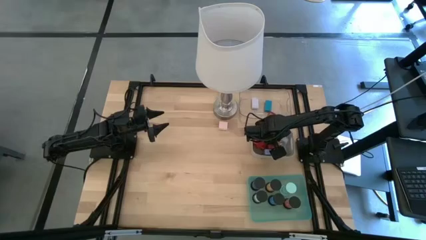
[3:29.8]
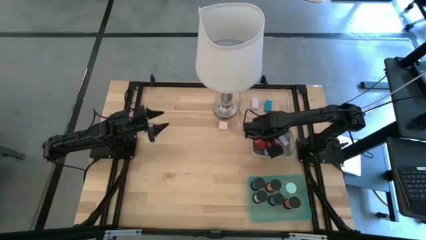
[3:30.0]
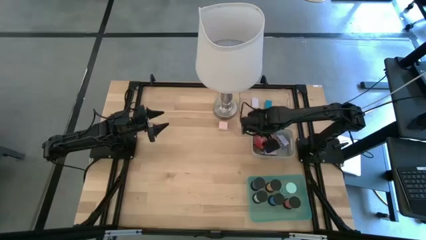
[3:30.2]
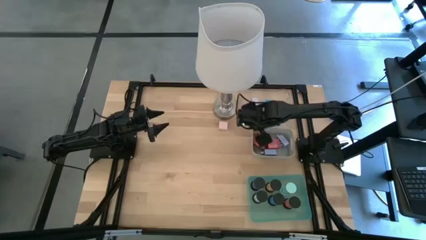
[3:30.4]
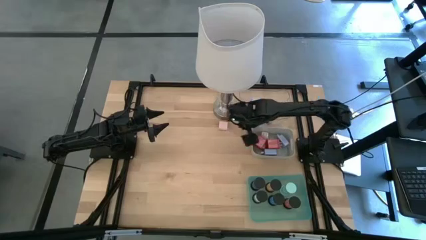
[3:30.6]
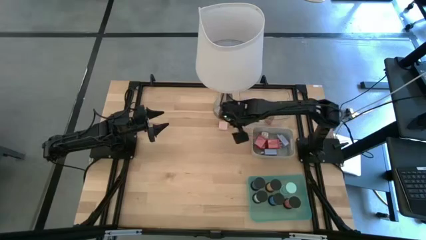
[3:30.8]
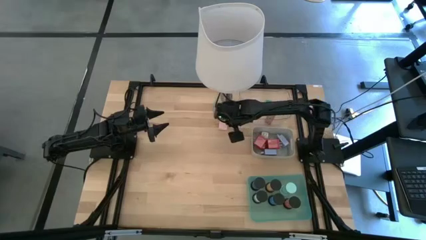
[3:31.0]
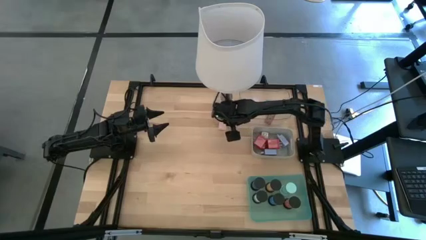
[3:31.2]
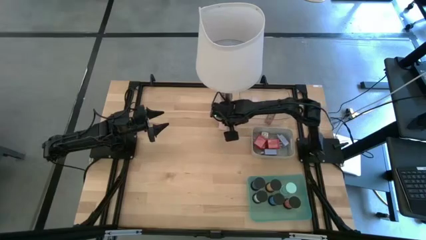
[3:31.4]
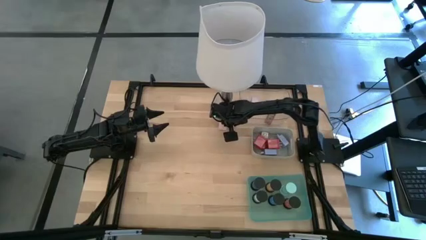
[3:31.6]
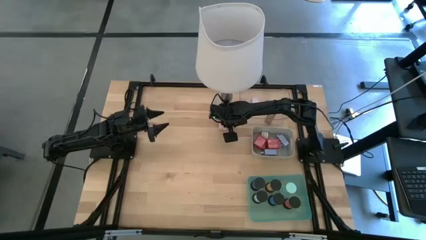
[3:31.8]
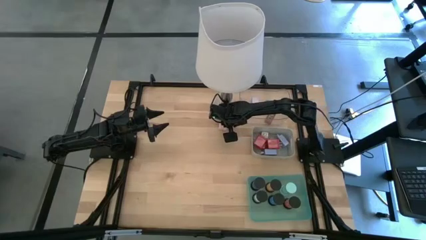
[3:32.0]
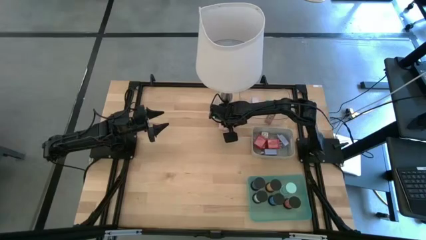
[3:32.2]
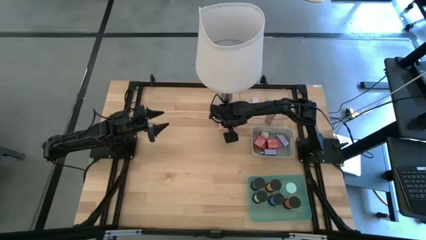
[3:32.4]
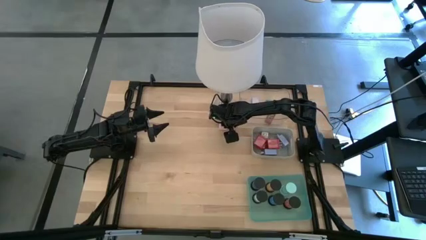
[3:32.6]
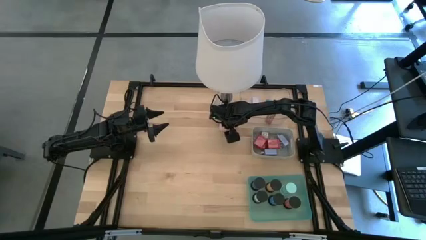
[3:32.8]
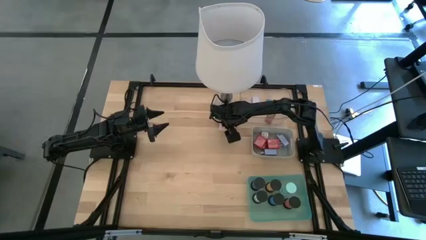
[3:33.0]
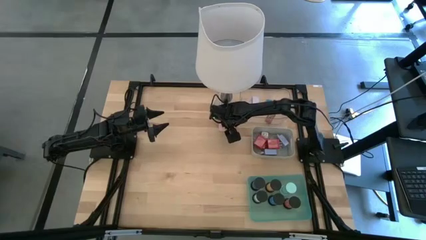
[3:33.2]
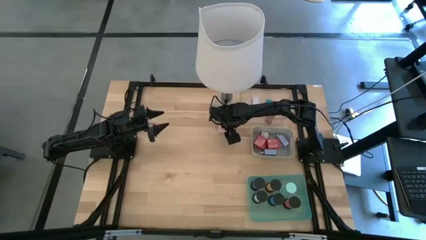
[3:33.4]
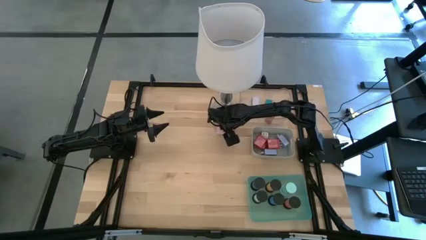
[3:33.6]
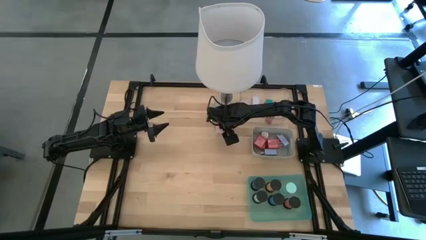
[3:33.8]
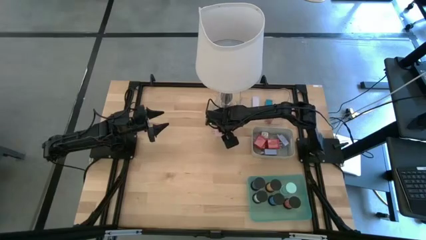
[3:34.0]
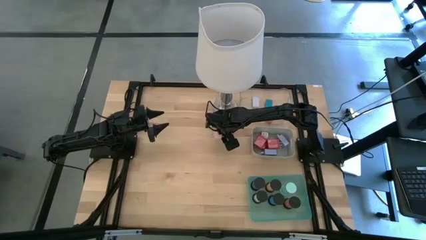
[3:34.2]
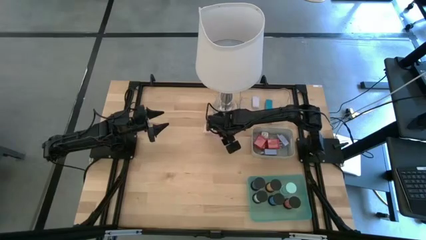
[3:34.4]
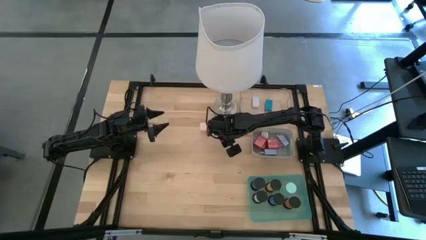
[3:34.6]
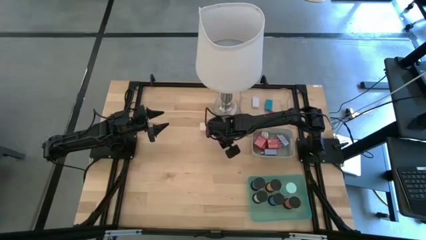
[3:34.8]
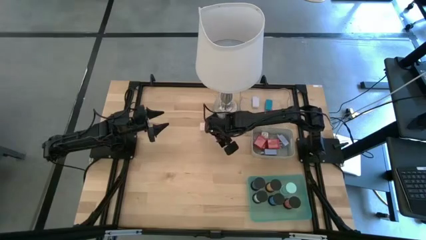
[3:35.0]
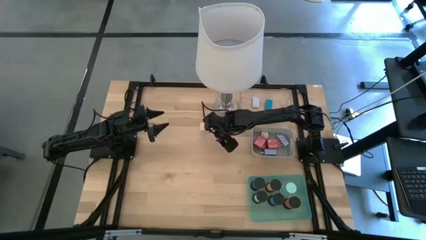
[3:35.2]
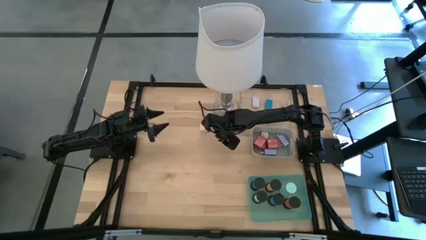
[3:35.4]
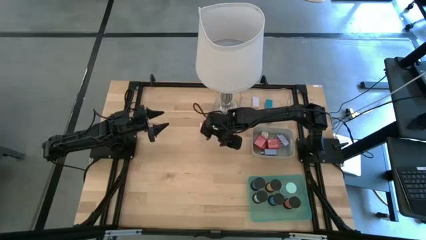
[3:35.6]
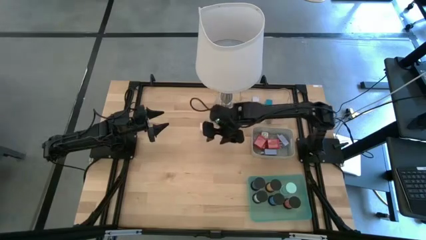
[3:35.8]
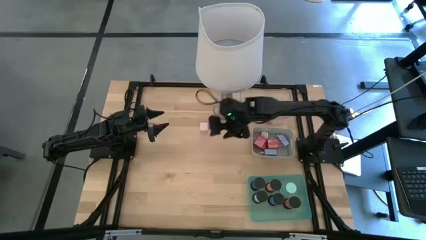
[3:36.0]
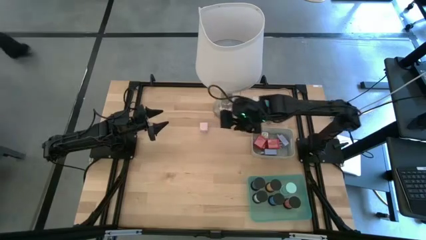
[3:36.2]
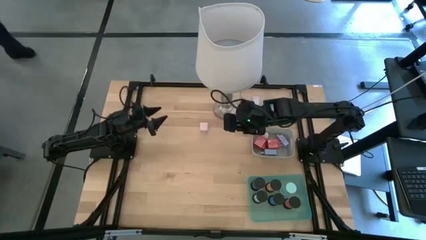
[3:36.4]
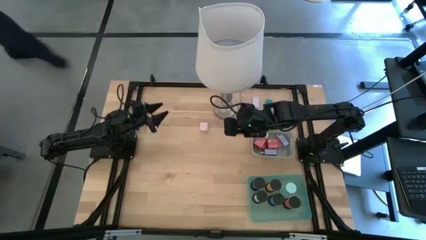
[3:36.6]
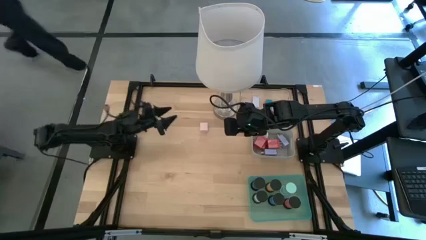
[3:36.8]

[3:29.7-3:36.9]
Task: Pick & Place Office items
Put the pink charger adapter into the gray bin

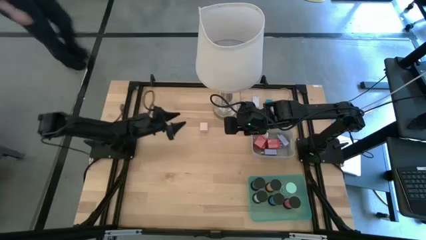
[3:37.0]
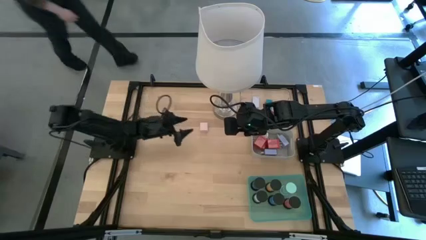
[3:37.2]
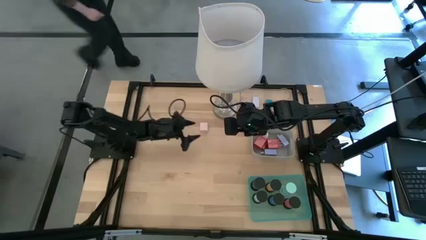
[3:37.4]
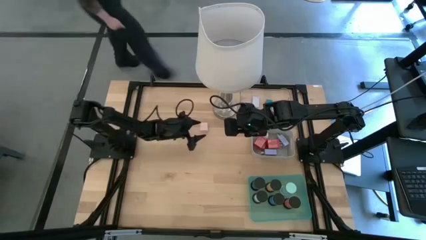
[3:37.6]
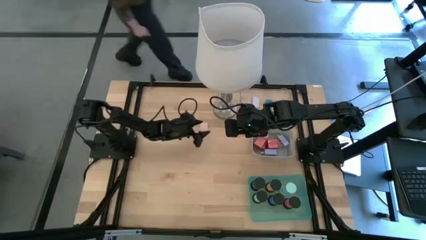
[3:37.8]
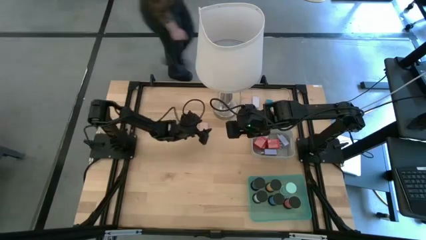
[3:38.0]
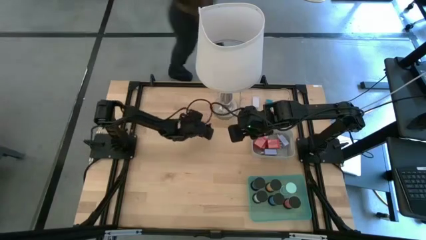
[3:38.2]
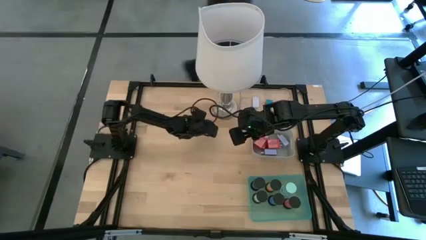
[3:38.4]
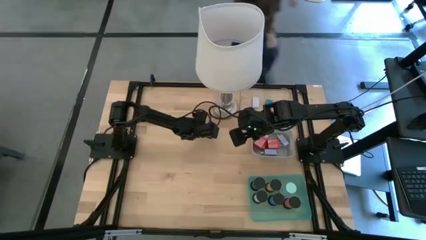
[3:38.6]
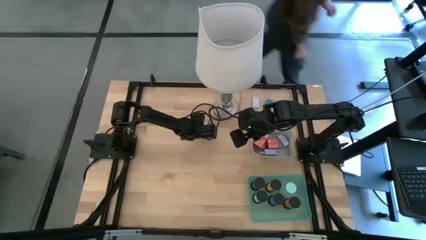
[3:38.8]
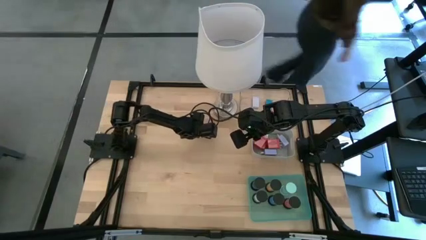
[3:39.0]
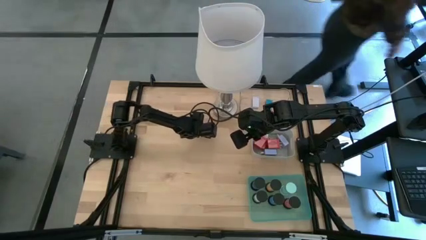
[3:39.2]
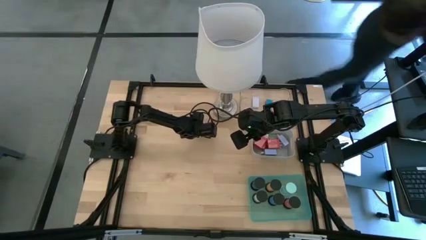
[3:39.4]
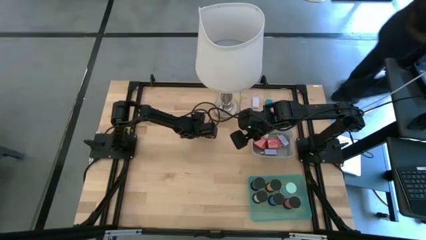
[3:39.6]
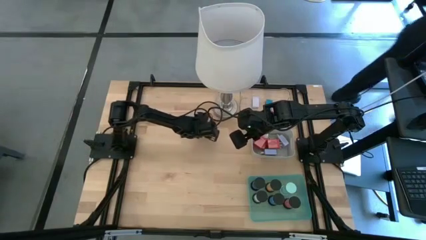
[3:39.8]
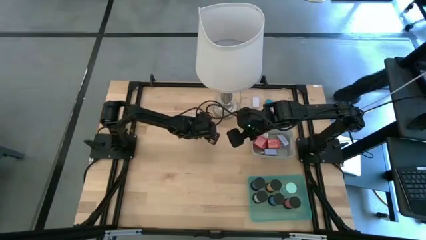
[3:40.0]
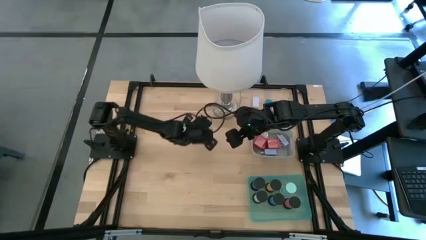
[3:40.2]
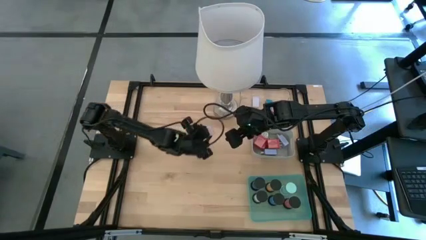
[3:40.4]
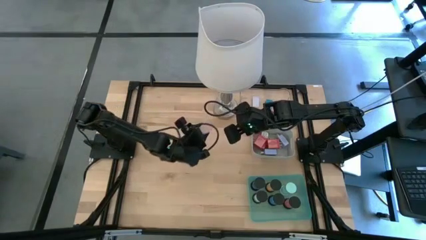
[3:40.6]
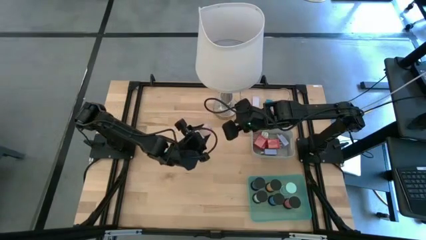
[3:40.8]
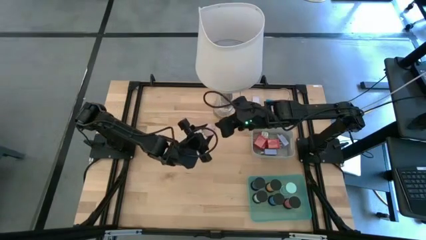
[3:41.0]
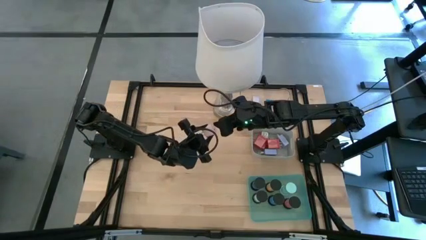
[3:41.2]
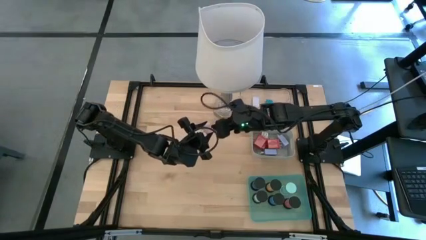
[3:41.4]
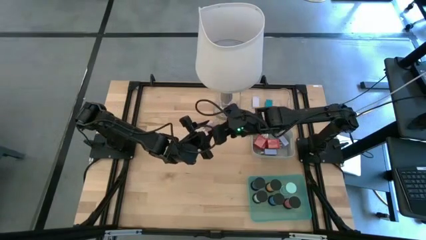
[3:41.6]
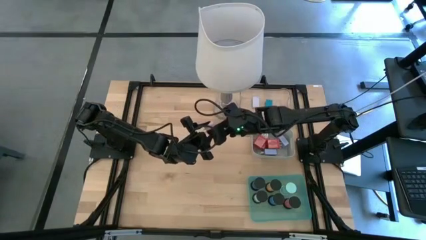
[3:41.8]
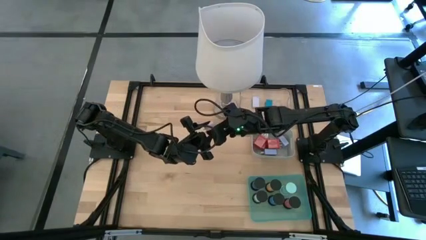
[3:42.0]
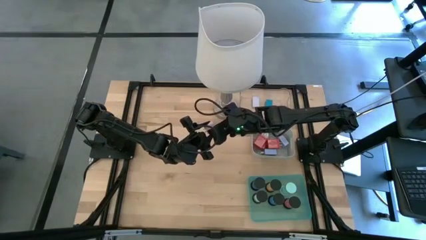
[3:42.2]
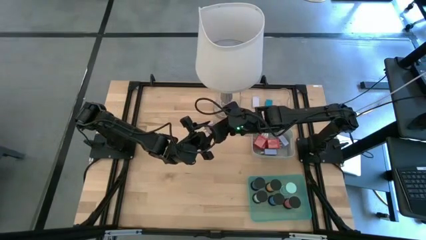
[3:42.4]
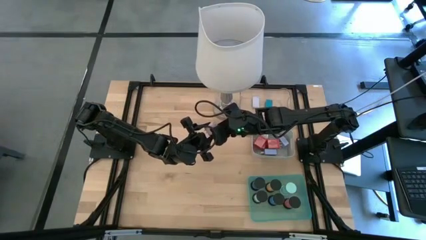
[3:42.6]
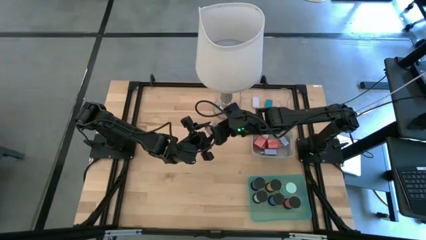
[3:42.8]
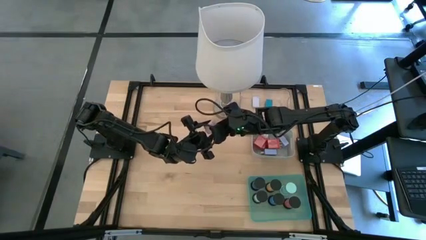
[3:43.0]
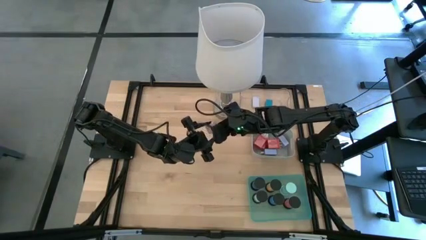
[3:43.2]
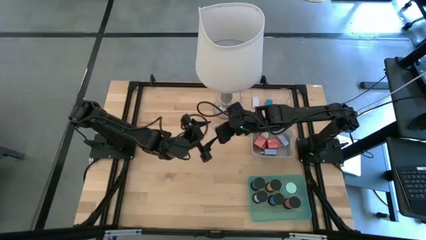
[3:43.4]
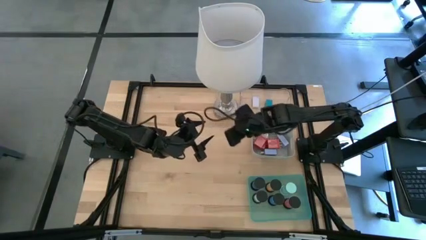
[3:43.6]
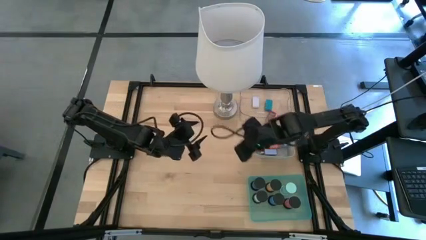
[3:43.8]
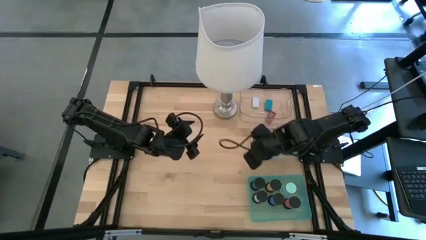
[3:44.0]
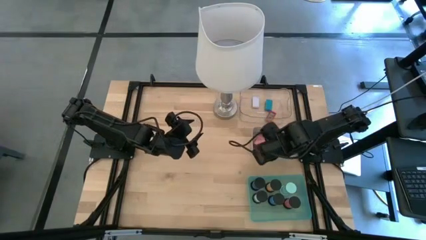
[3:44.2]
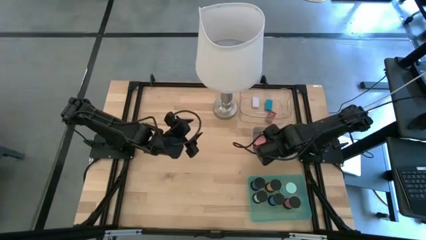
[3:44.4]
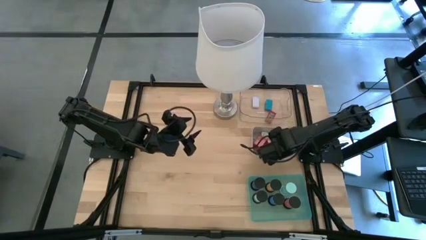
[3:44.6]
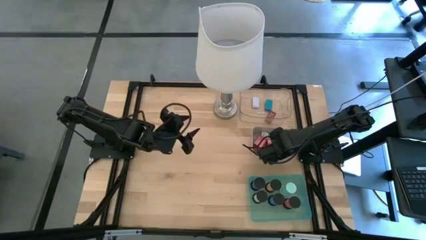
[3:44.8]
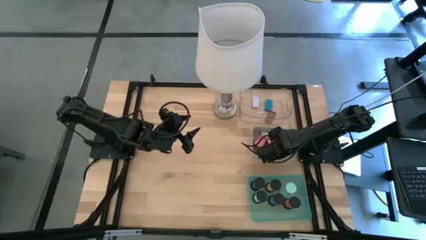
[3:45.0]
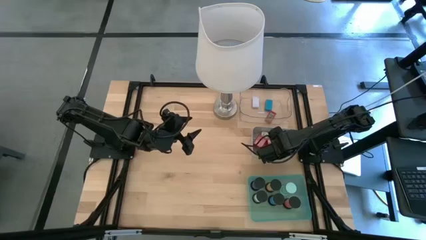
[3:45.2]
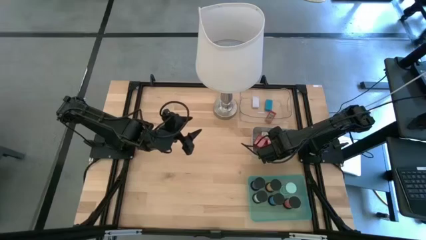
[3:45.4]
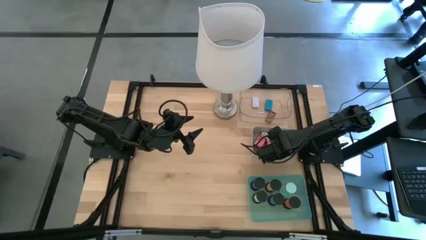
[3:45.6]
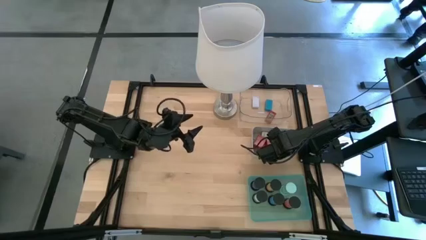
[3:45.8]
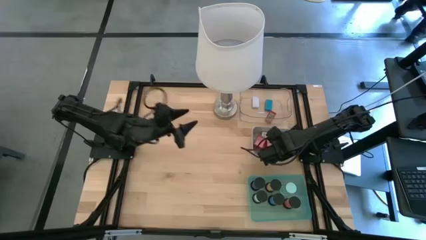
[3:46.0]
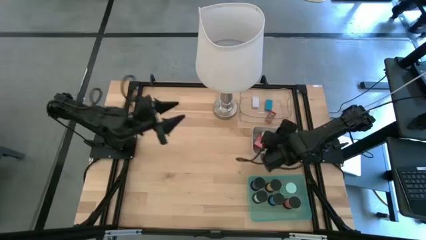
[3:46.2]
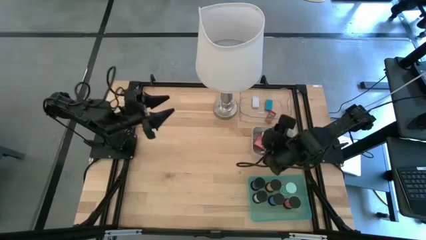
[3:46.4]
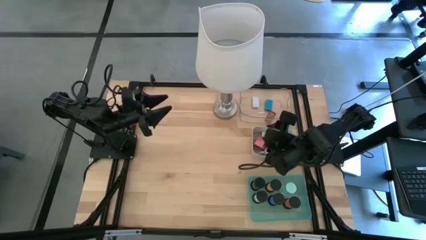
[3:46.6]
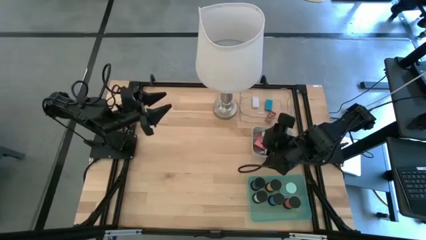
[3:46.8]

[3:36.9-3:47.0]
Put the pink charger adapter into the gray bin
